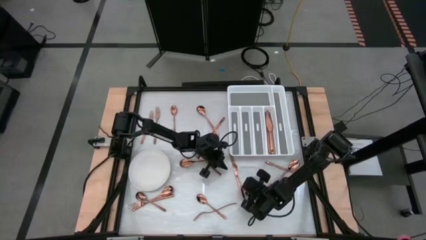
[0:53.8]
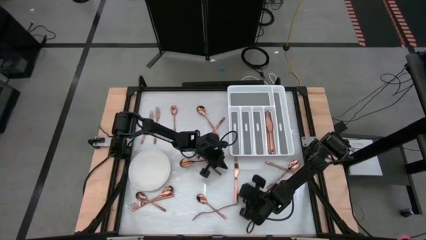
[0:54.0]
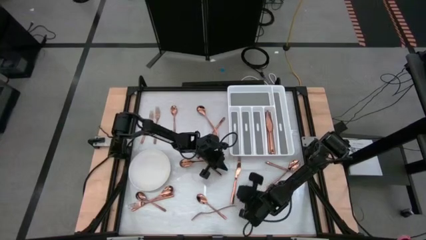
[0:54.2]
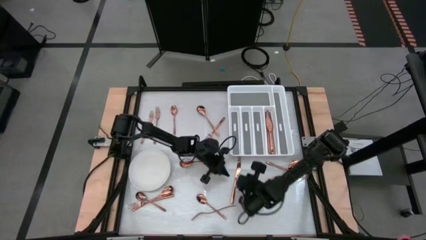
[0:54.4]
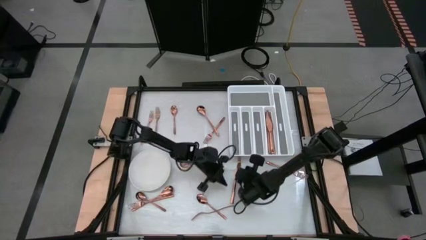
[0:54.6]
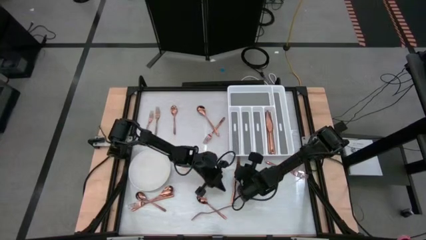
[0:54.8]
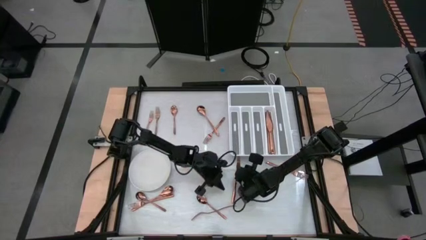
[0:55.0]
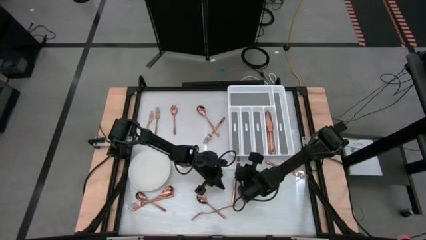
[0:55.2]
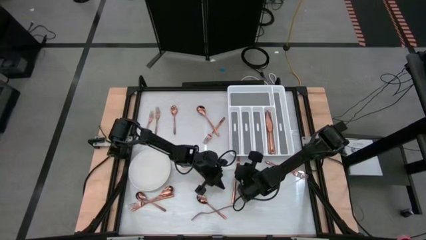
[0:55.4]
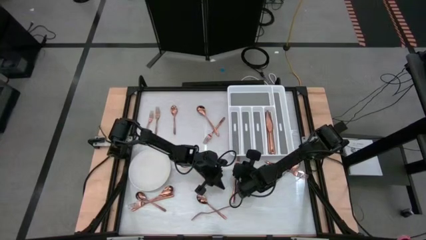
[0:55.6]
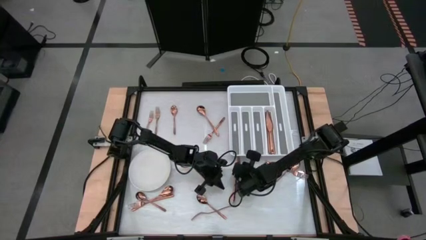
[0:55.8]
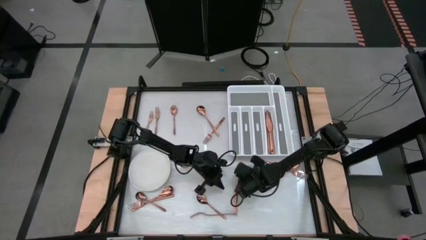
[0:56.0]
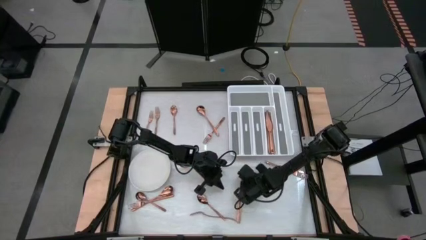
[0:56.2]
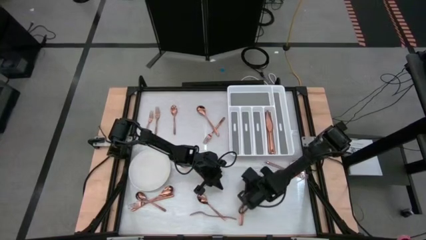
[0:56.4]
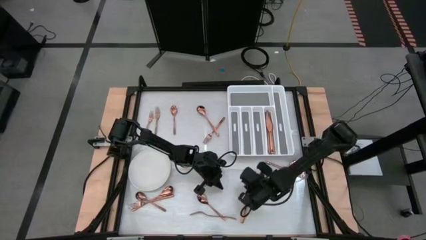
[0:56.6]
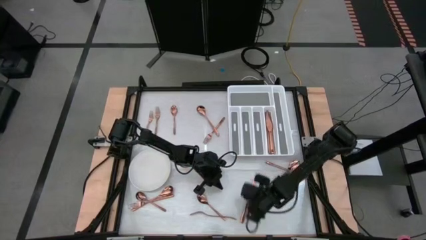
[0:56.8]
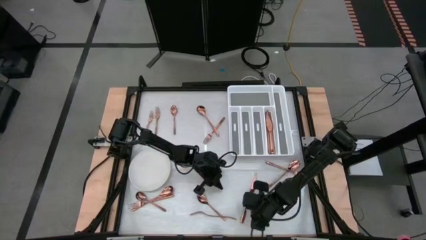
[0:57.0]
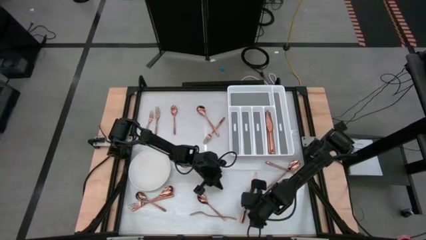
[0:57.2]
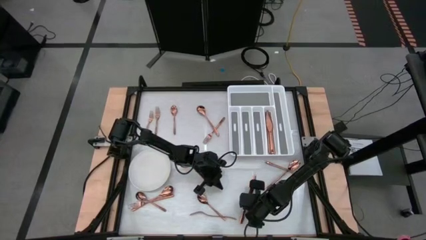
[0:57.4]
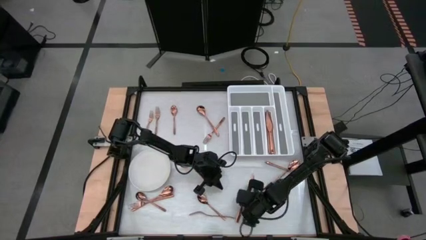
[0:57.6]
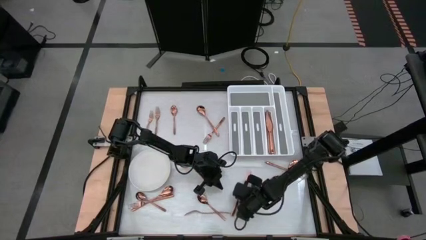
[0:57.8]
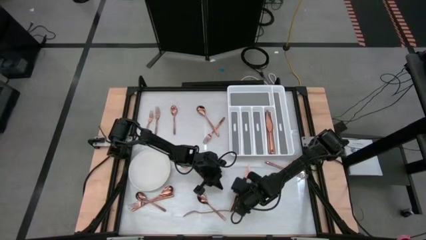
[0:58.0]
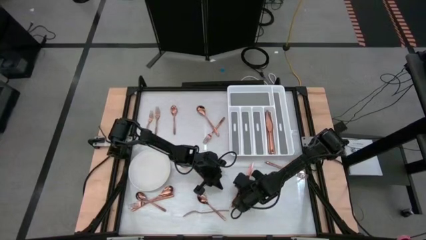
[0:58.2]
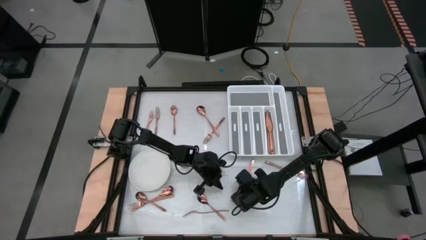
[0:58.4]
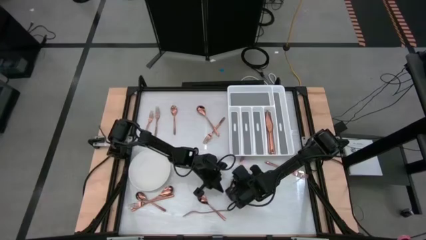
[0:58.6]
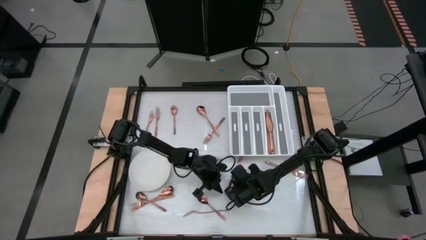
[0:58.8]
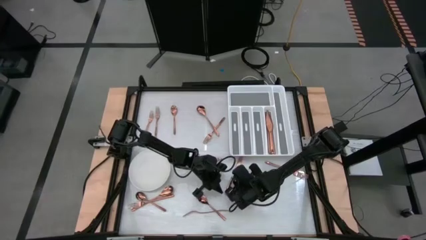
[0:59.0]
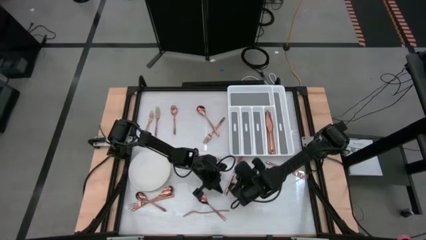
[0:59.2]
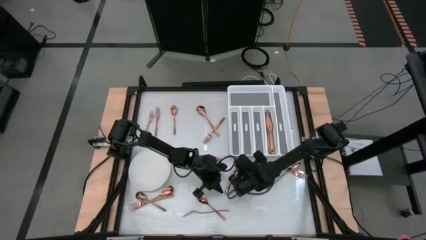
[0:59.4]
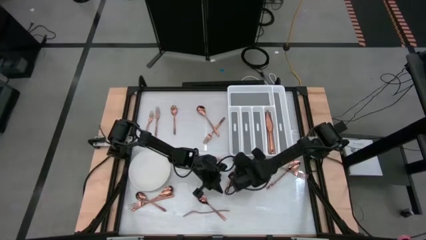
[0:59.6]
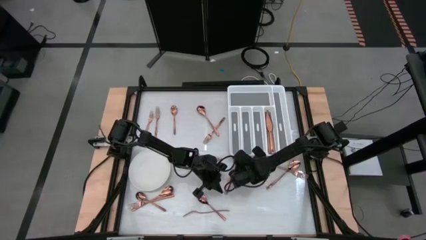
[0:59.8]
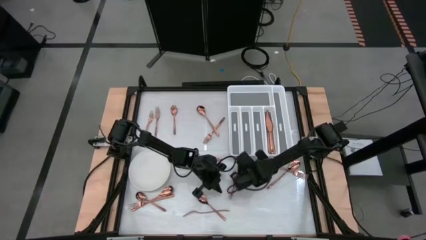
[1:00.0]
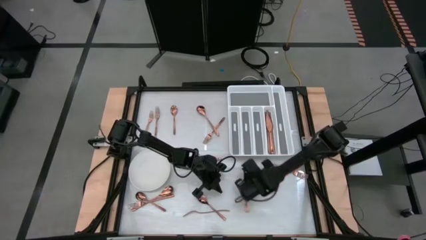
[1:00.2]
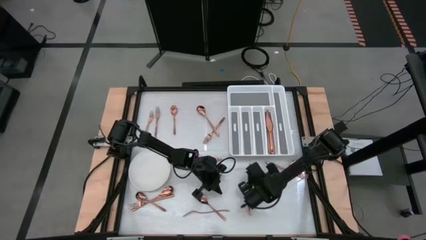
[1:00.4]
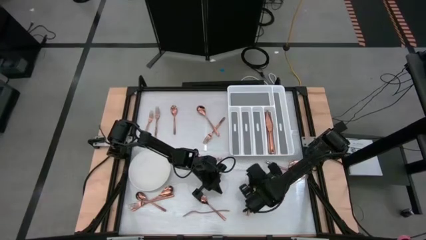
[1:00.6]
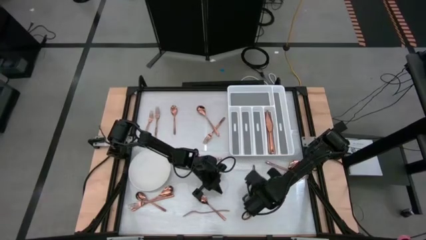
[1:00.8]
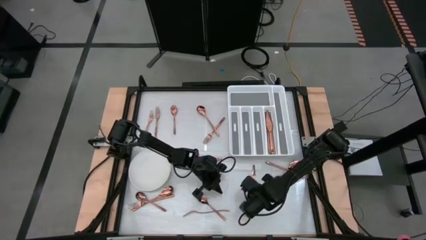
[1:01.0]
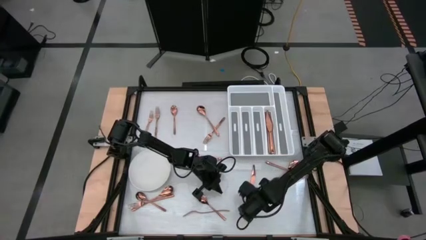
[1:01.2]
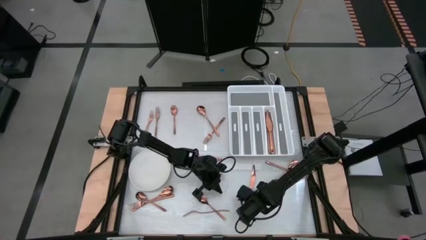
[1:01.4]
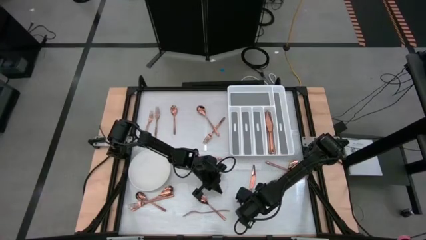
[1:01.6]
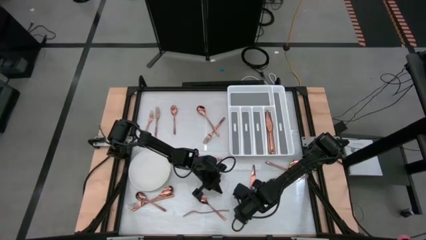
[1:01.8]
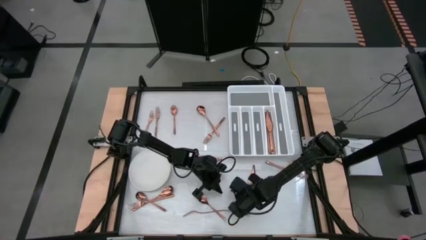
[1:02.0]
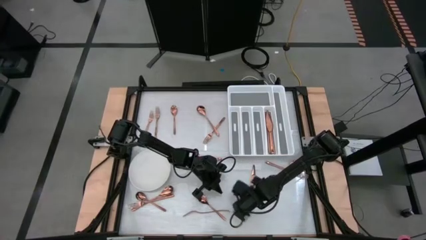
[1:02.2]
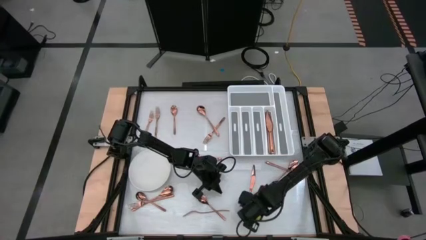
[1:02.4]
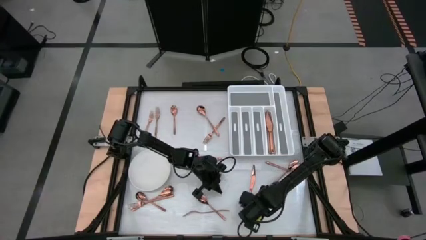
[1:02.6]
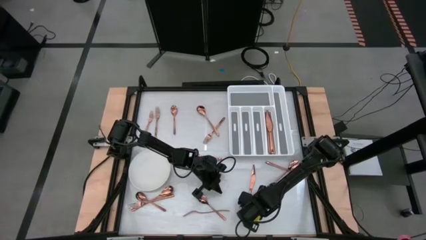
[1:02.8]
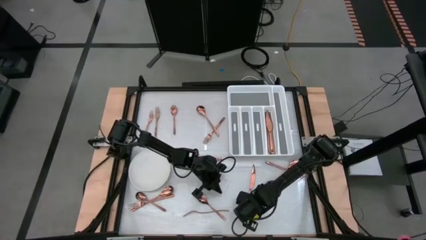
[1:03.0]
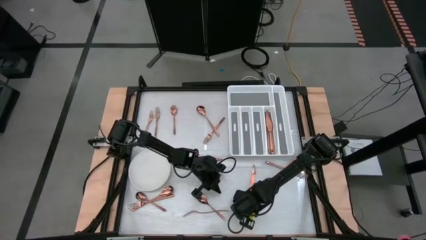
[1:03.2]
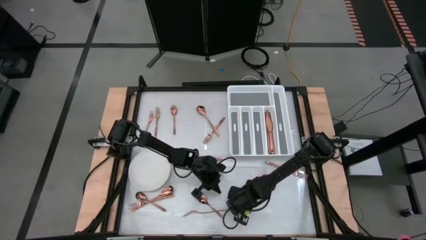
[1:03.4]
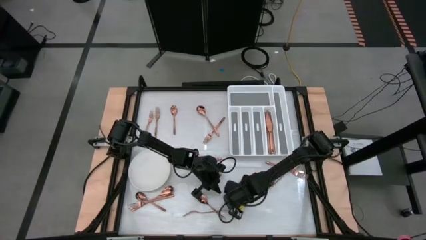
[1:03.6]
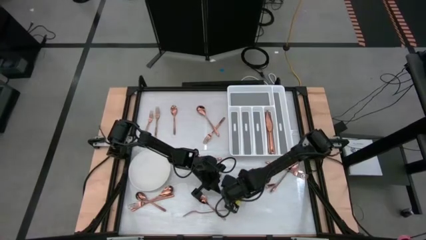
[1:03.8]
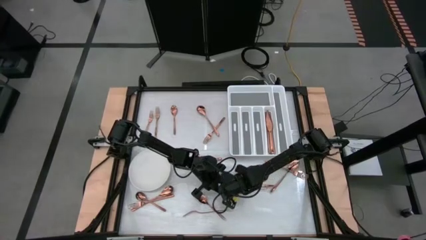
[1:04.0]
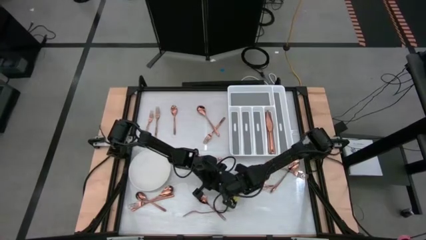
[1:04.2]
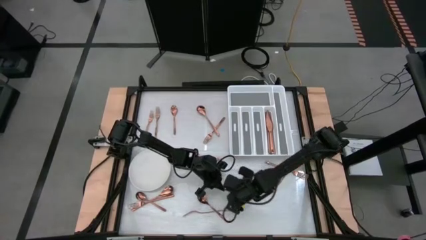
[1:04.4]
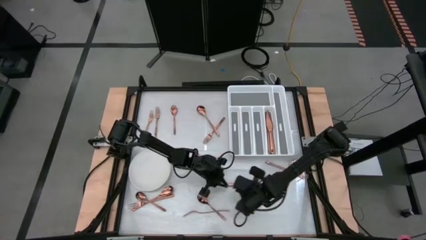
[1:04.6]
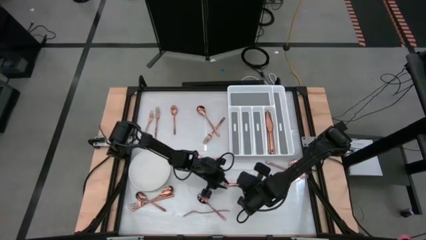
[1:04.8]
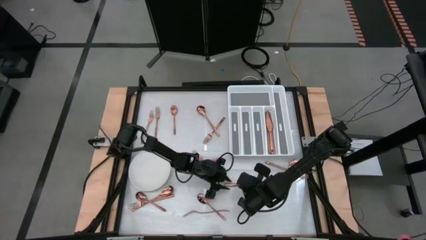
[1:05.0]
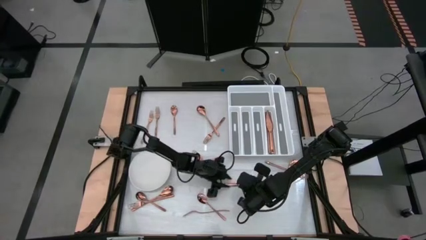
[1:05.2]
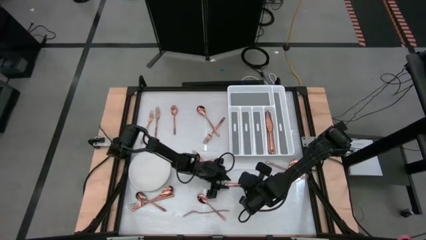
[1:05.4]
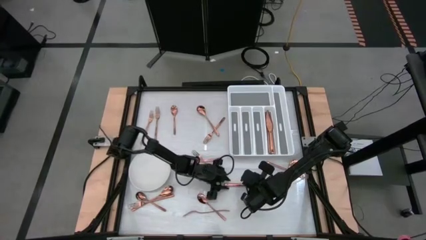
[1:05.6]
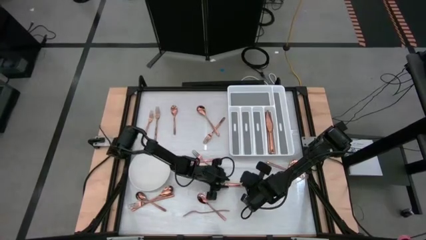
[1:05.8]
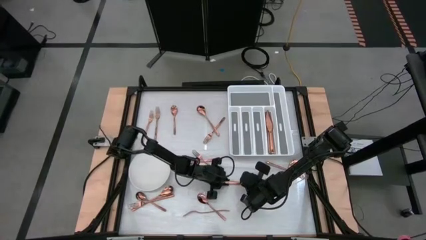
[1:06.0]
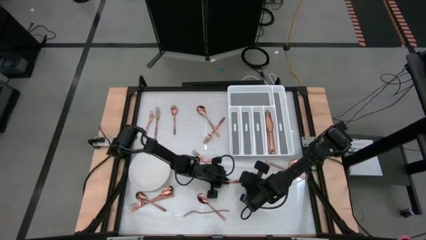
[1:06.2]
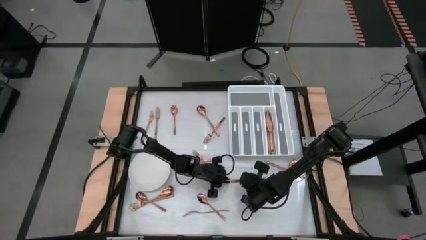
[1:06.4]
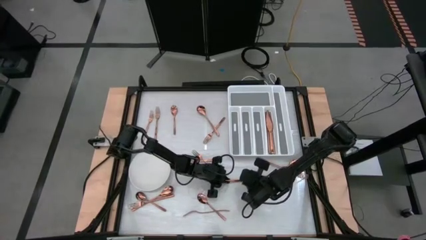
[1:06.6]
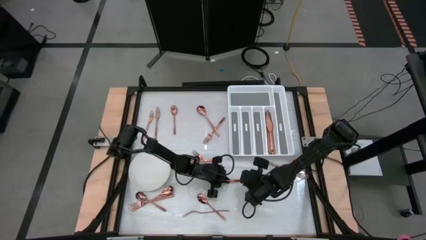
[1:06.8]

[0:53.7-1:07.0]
Task: Sort silverware
Put the bronze knife into the silverware tray
